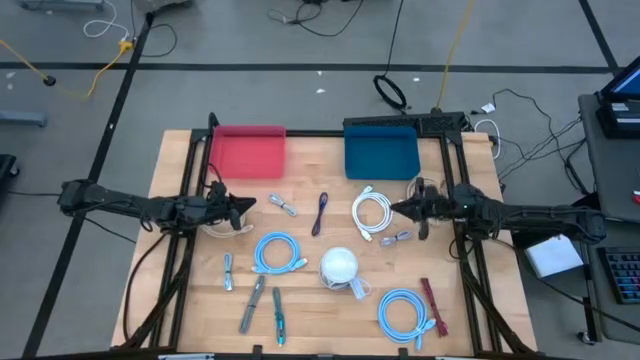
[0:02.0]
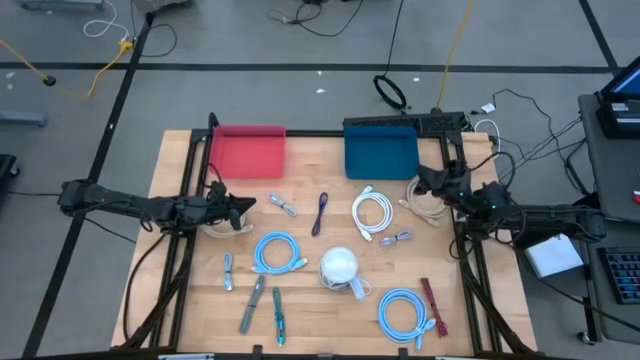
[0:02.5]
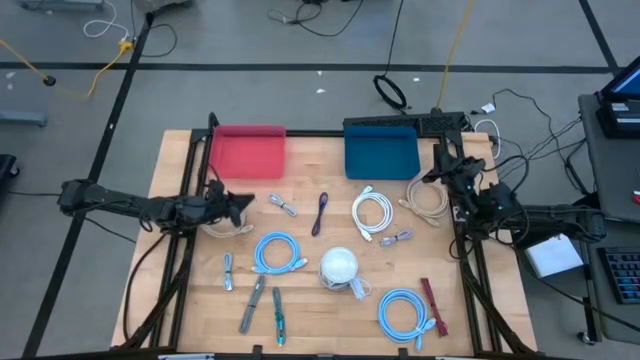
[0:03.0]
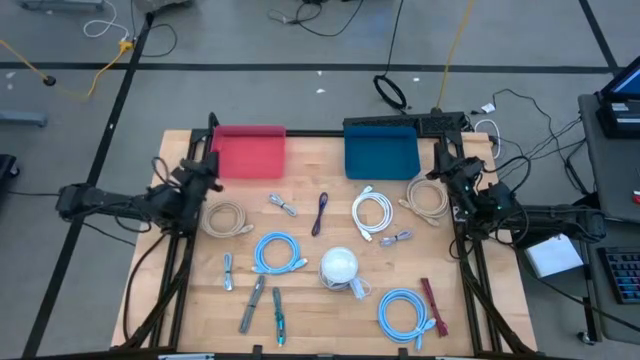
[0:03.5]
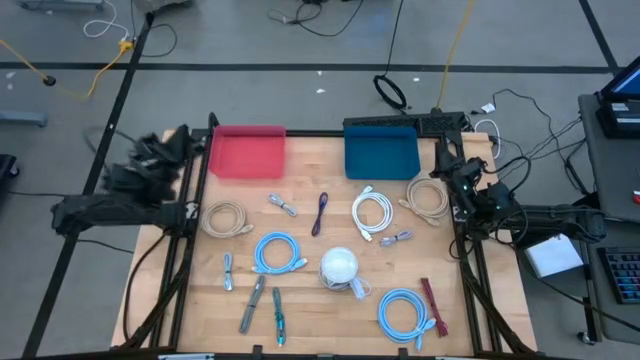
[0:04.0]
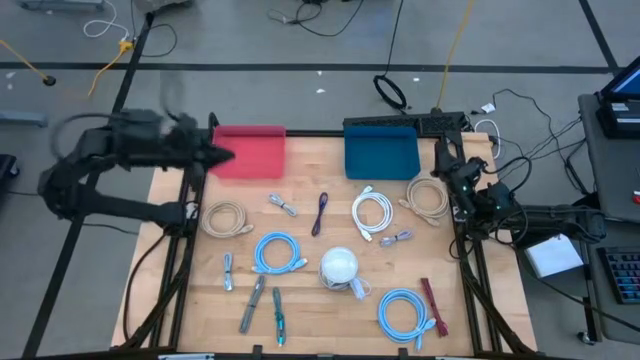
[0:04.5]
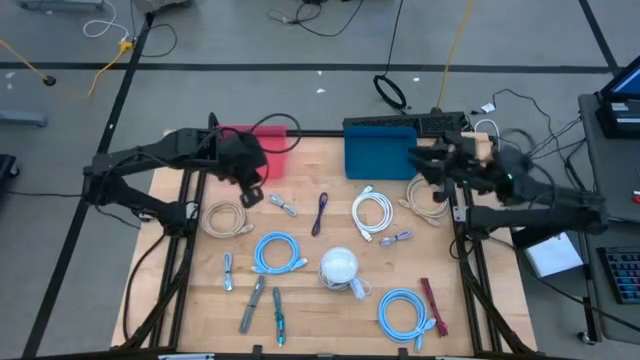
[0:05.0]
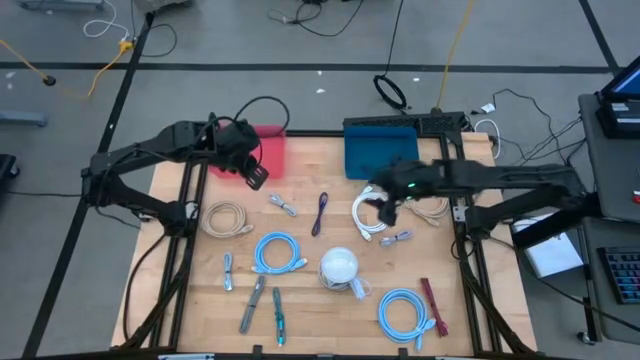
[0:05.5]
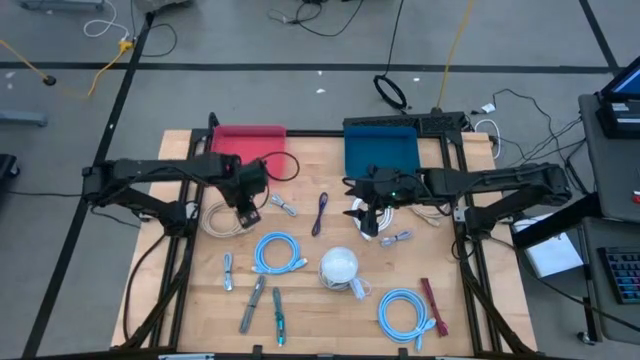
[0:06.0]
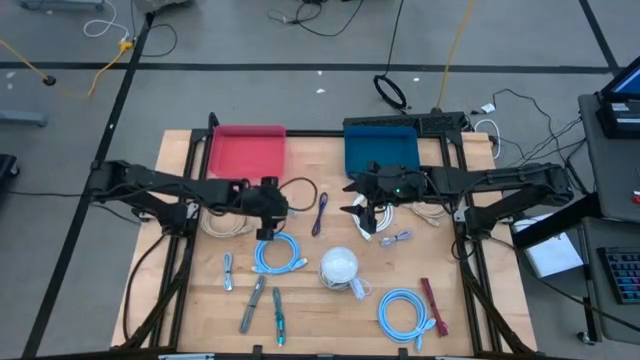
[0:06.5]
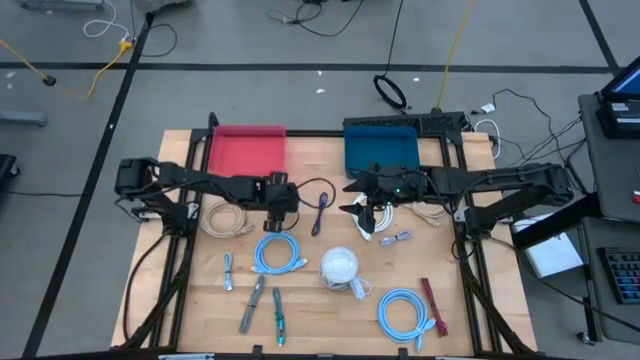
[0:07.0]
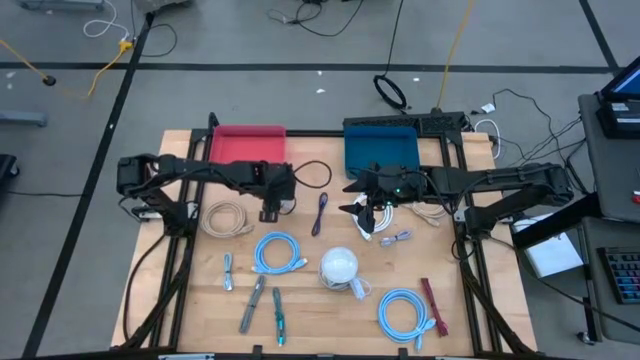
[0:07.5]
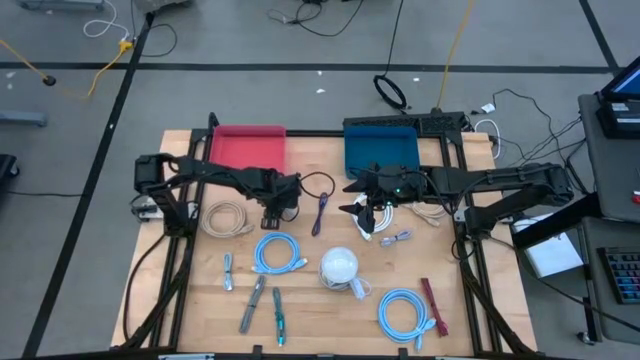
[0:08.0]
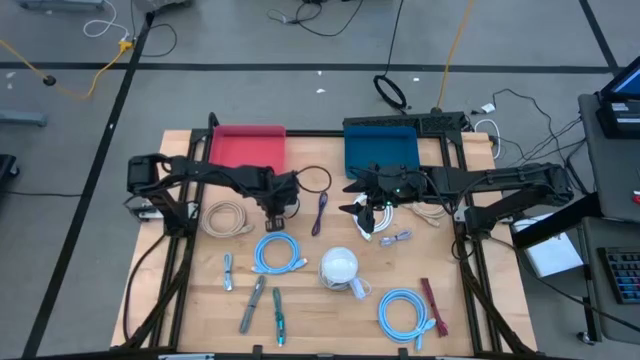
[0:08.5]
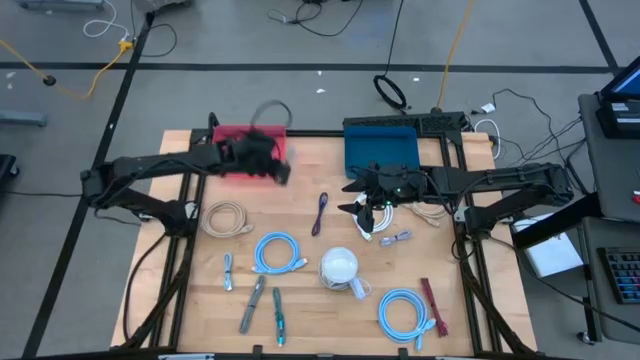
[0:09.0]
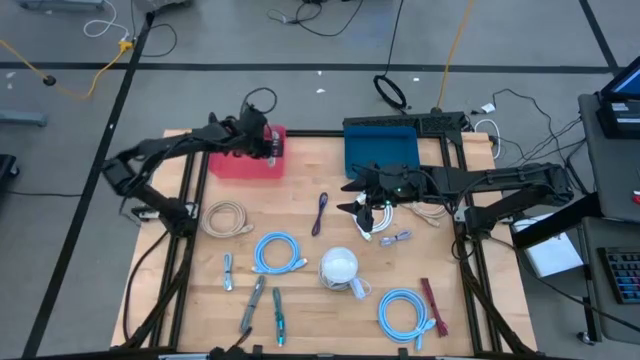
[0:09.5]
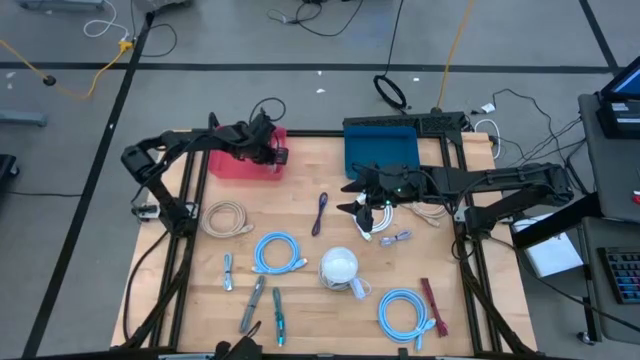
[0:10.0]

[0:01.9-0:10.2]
Task: Pick & Place USB Port
Put the light blue USB cable into the pink bin

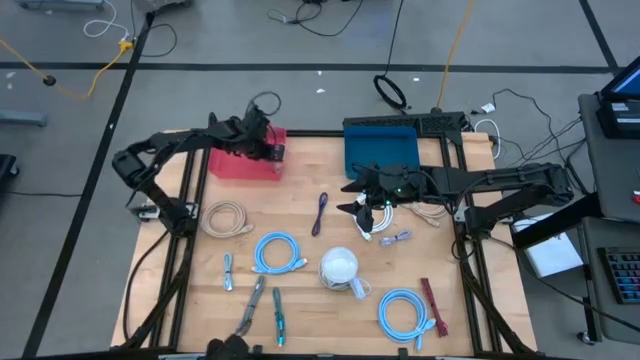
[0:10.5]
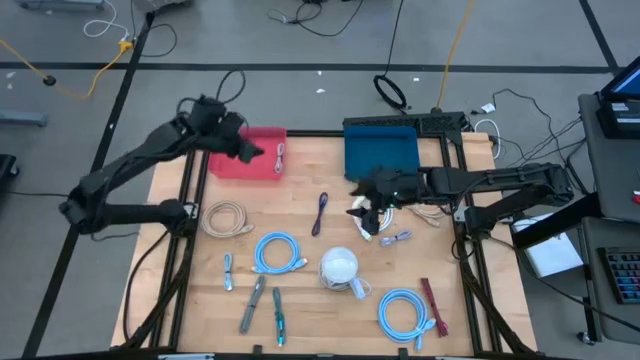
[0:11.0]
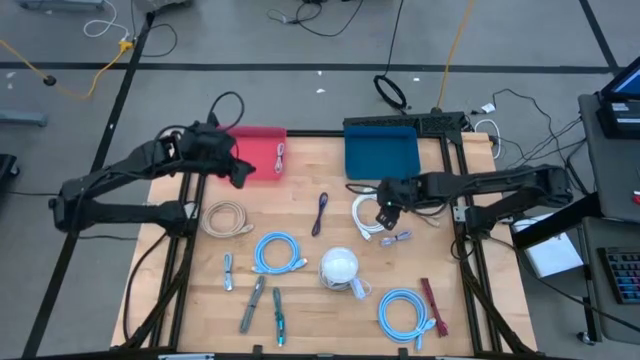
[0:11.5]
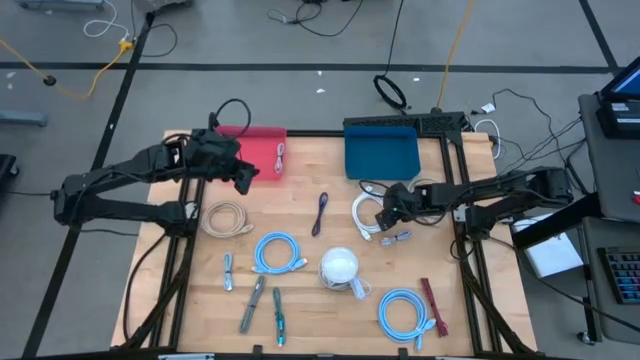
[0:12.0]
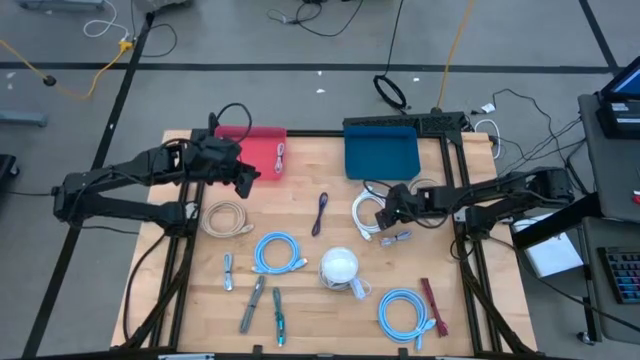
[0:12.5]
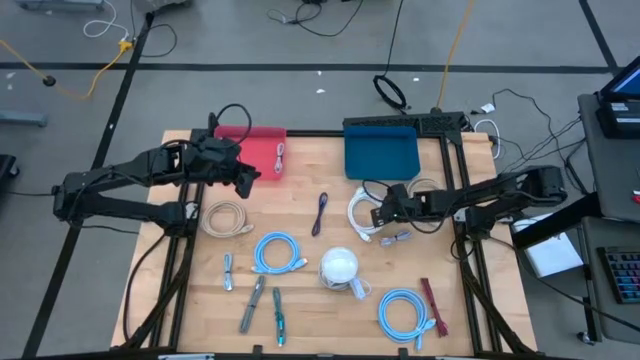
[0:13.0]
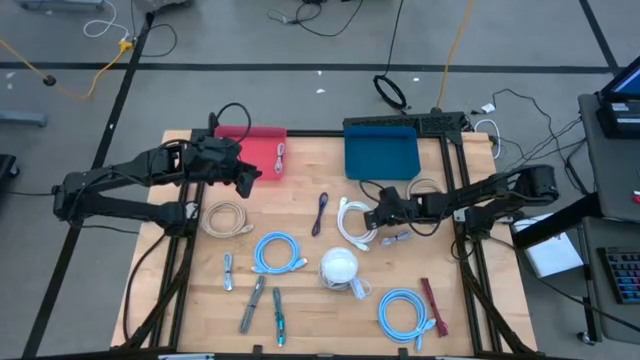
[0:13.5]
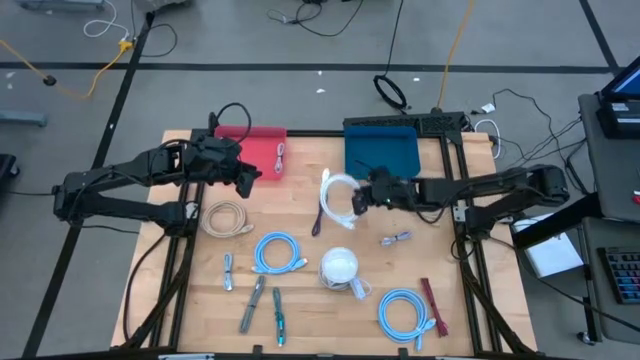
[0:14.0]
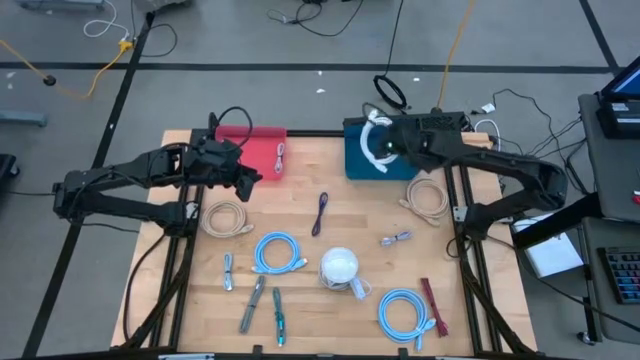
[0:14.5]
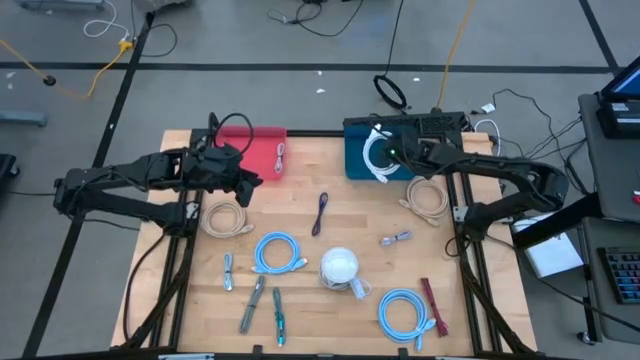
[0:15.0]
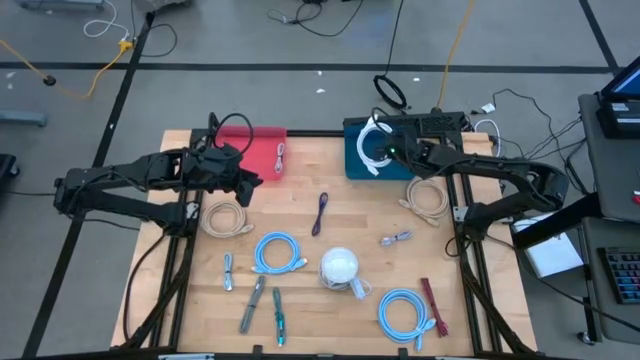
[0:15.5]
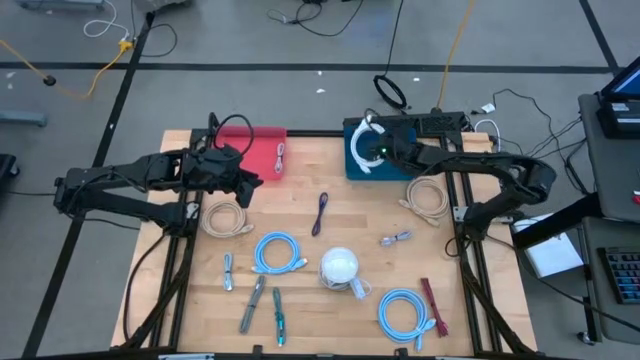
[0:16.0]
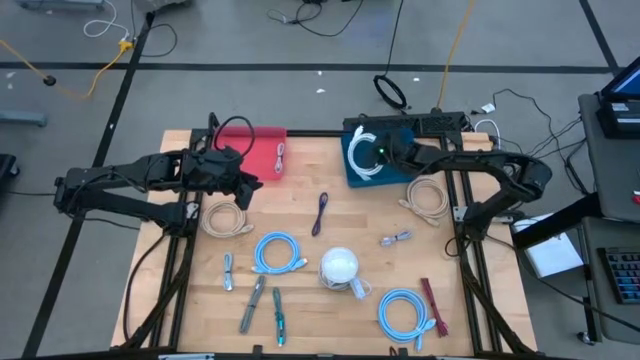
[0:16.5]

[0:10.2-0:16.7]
Put the white USB cable into the blue bin

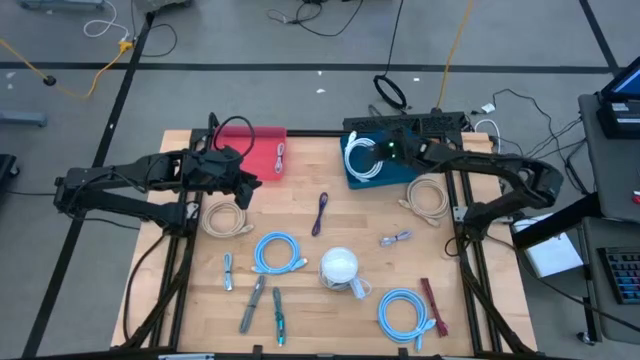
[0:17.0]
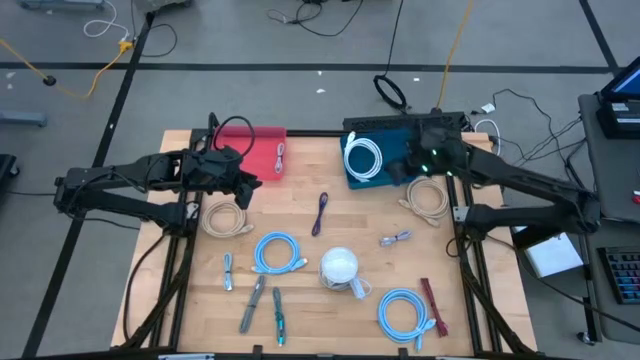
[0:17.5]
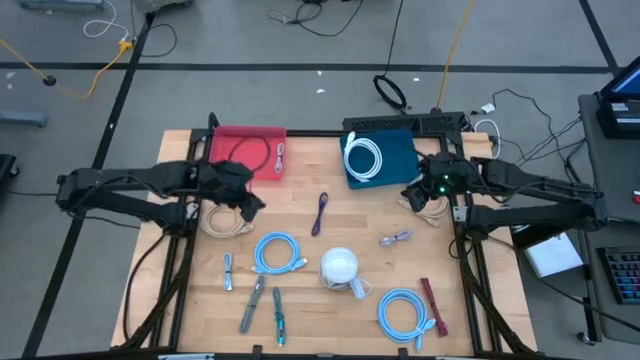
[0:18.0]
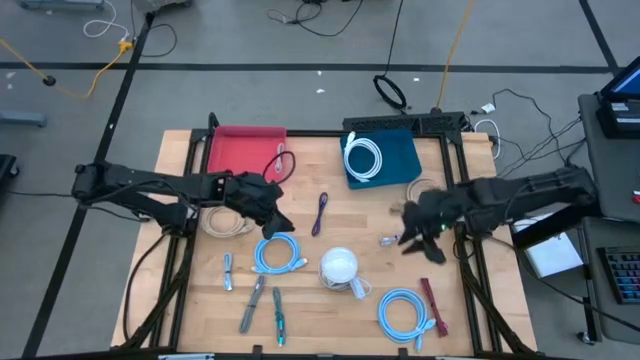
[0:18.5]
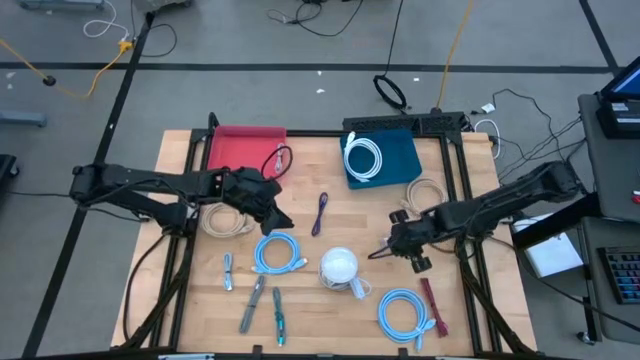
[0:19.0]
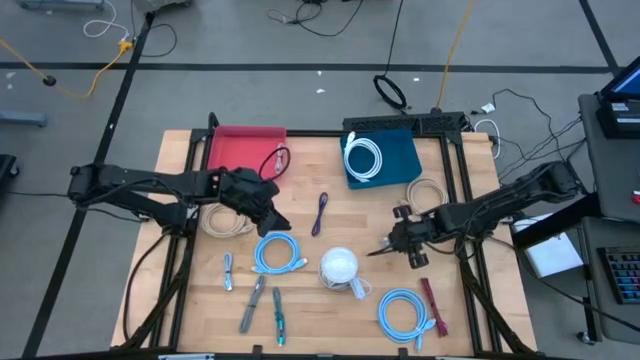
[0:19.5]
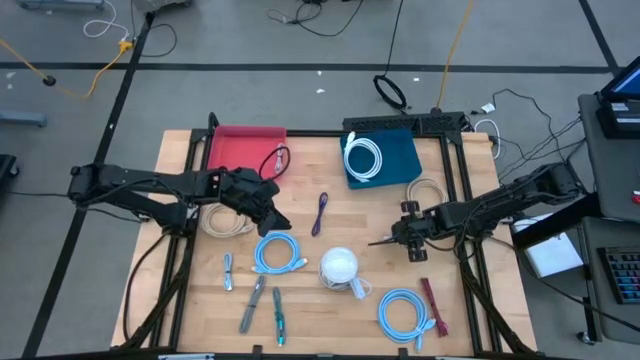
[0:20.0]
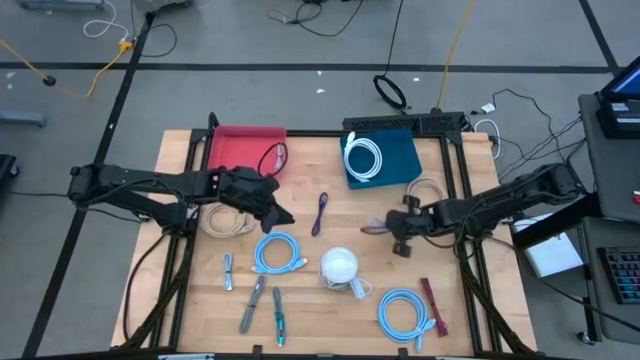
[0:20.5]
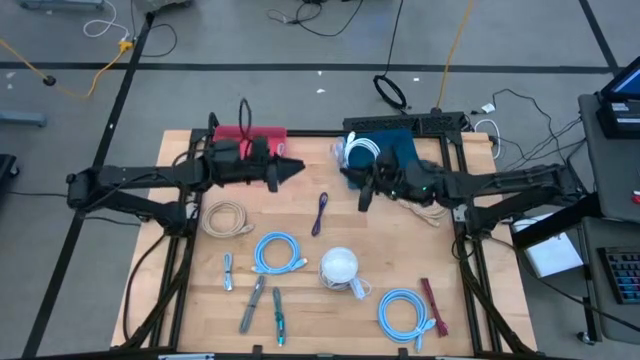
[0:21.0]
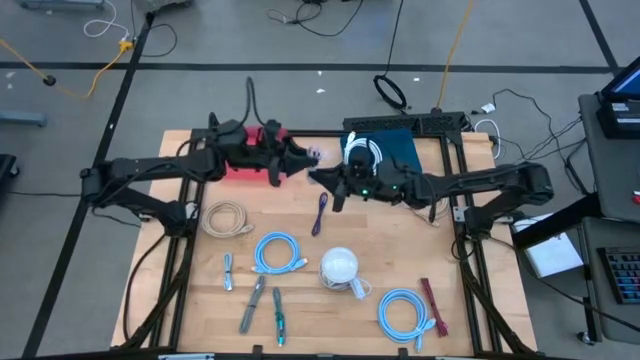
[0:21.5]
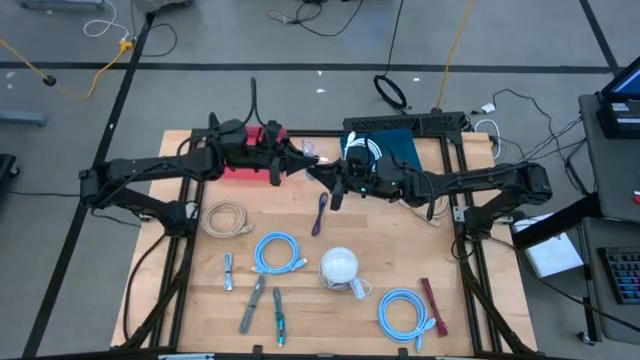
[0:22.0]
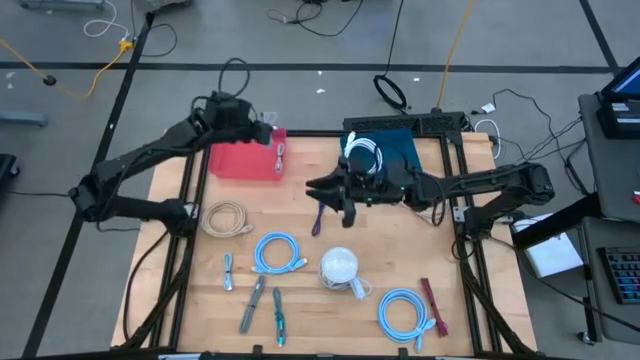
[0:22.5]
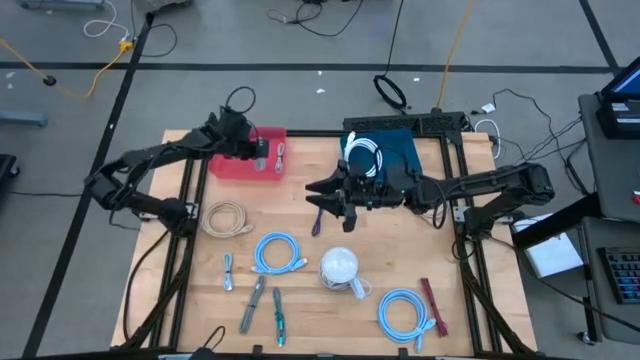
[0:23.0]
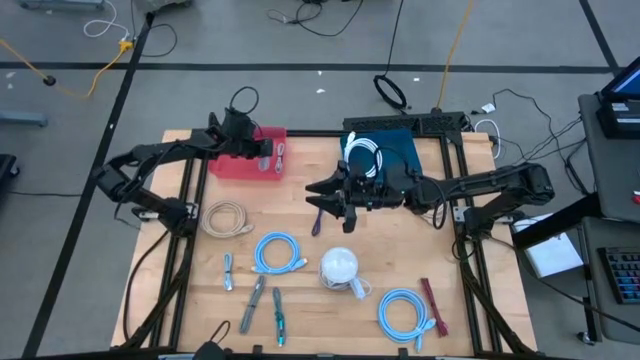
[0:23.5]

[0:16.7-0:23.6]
Put the purple USB cable into the pink bin
